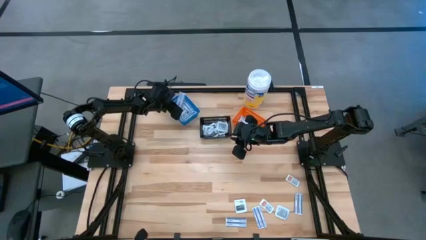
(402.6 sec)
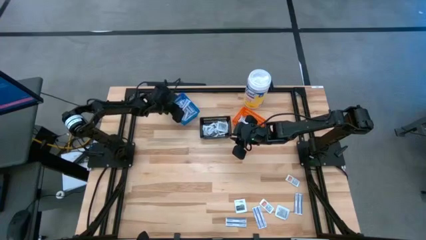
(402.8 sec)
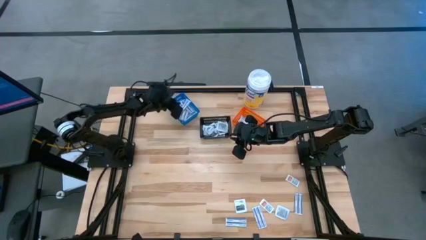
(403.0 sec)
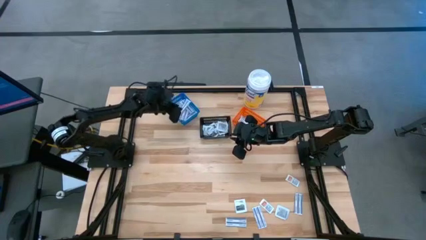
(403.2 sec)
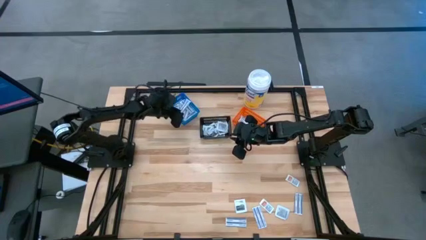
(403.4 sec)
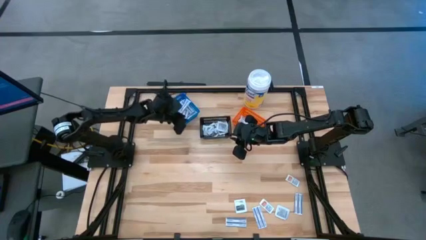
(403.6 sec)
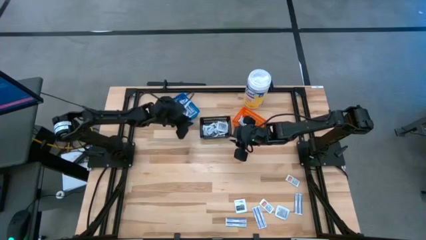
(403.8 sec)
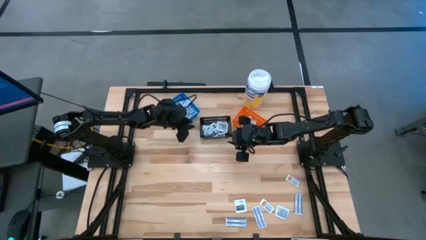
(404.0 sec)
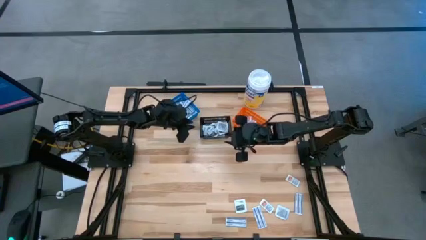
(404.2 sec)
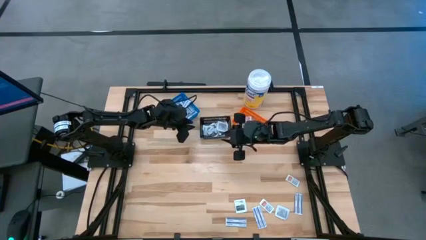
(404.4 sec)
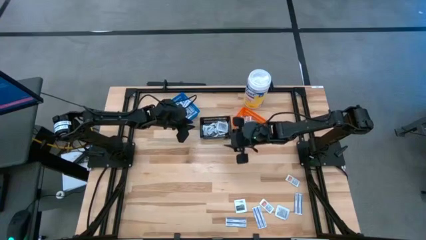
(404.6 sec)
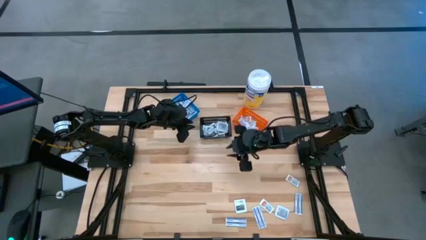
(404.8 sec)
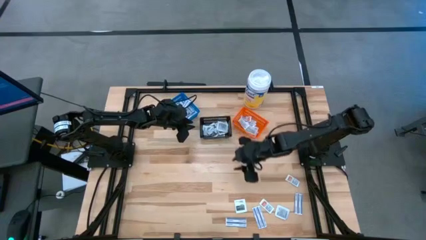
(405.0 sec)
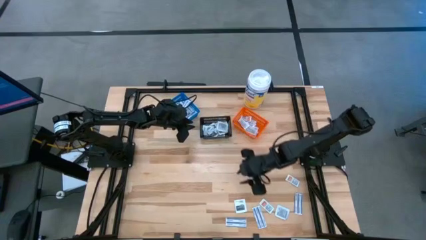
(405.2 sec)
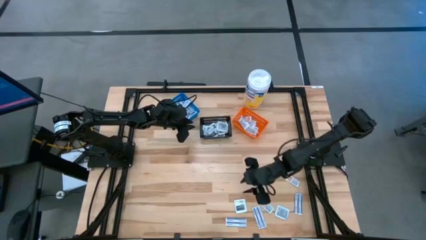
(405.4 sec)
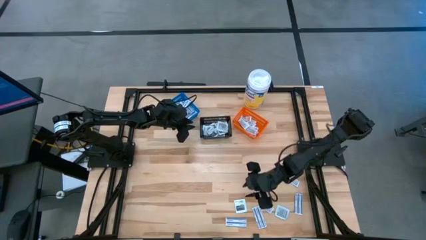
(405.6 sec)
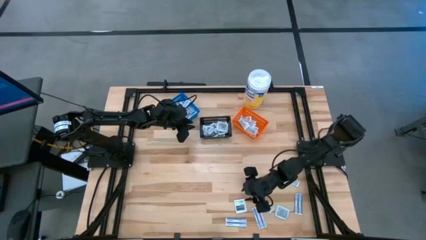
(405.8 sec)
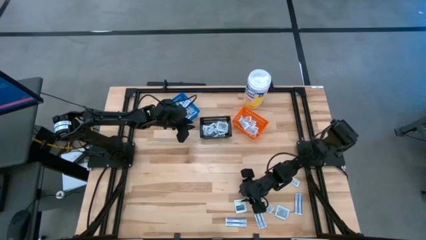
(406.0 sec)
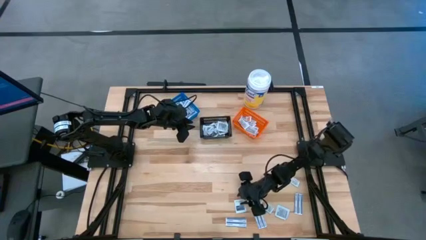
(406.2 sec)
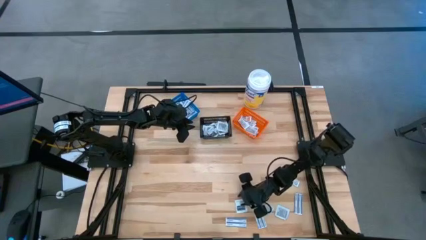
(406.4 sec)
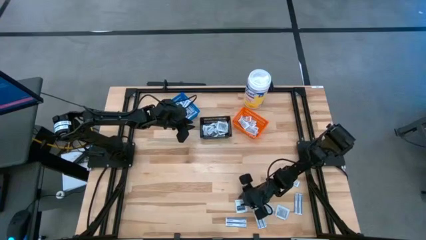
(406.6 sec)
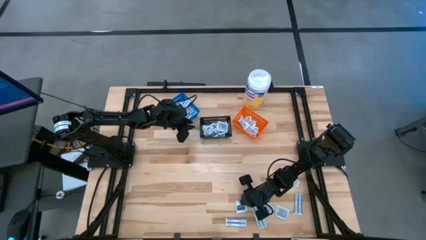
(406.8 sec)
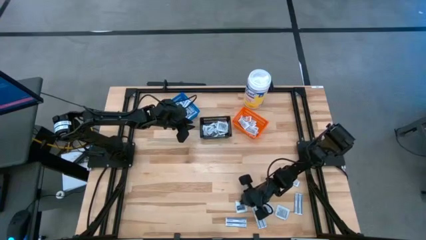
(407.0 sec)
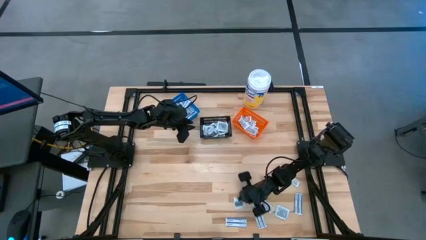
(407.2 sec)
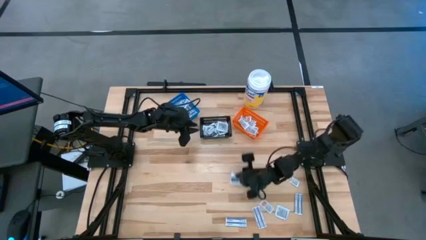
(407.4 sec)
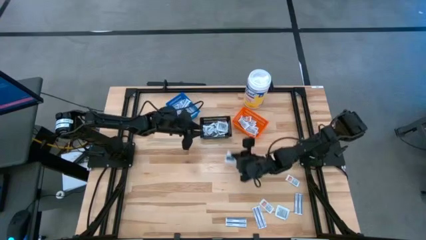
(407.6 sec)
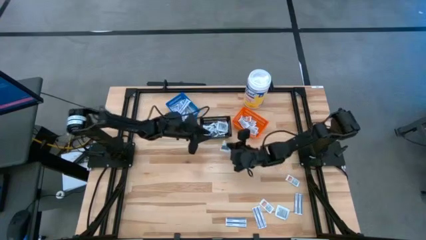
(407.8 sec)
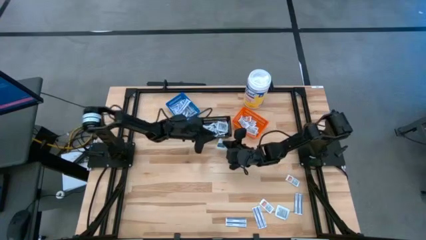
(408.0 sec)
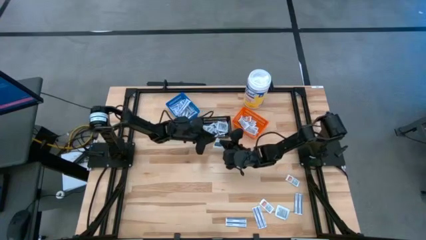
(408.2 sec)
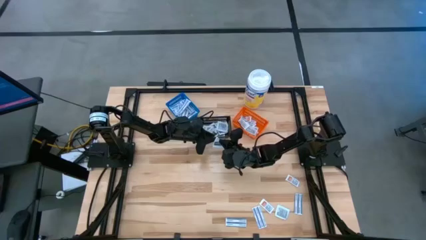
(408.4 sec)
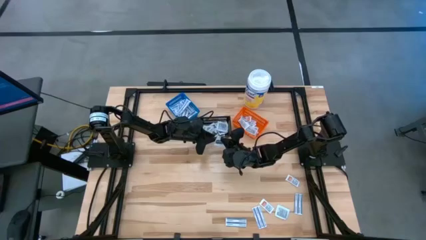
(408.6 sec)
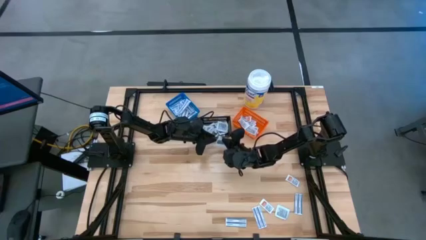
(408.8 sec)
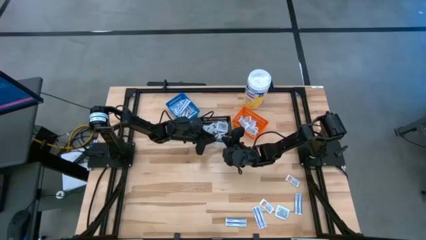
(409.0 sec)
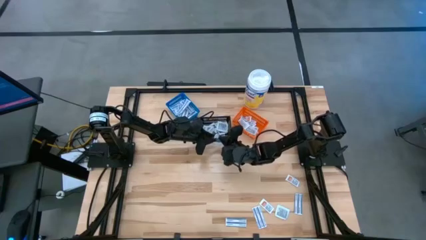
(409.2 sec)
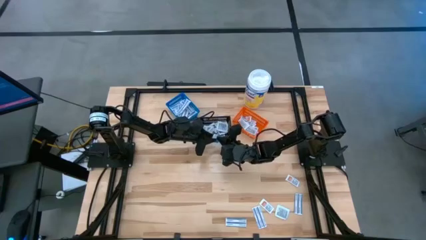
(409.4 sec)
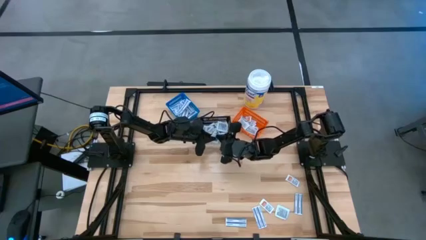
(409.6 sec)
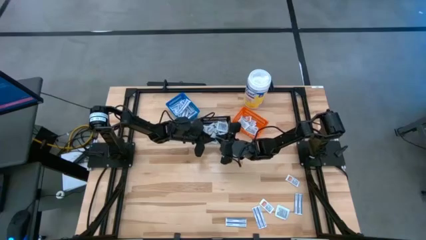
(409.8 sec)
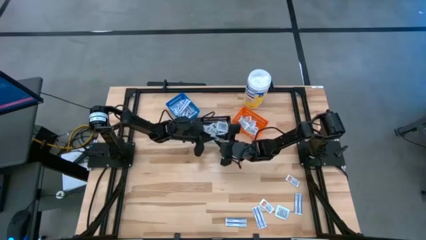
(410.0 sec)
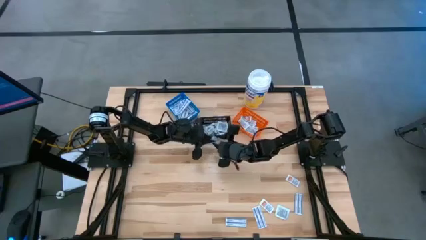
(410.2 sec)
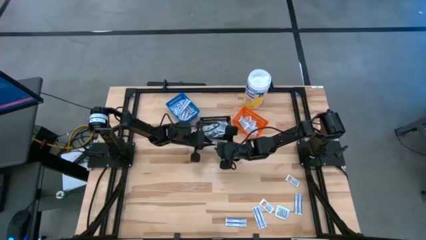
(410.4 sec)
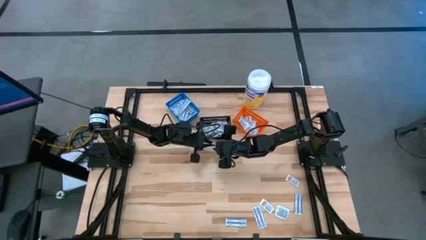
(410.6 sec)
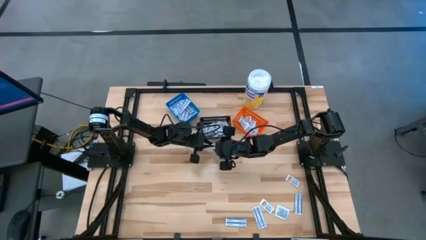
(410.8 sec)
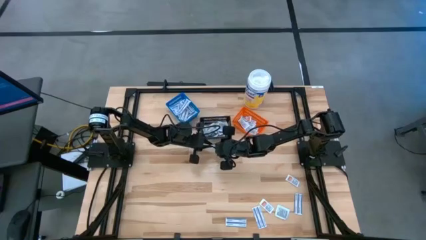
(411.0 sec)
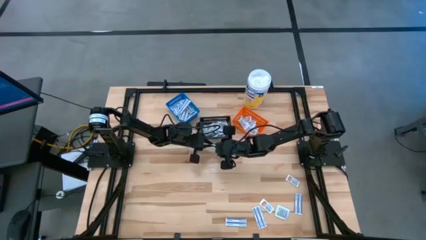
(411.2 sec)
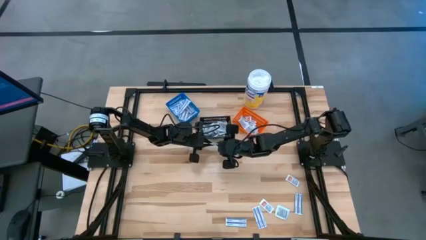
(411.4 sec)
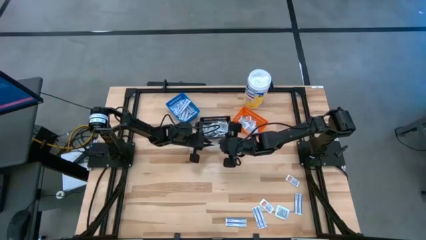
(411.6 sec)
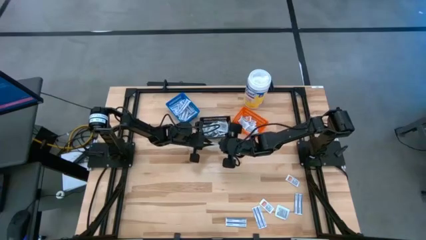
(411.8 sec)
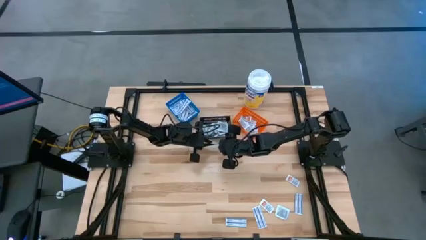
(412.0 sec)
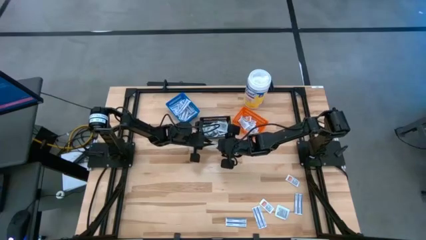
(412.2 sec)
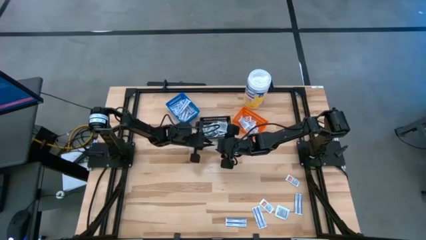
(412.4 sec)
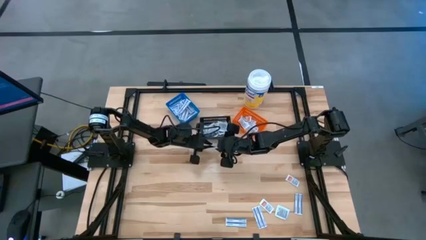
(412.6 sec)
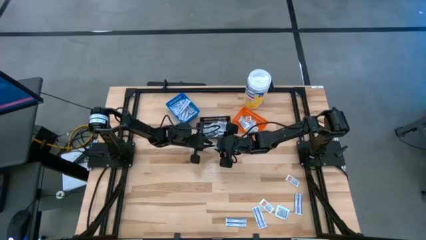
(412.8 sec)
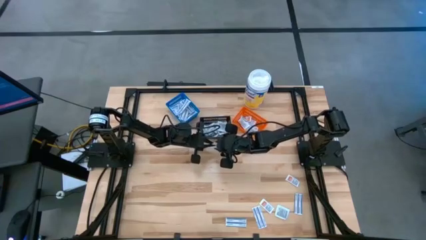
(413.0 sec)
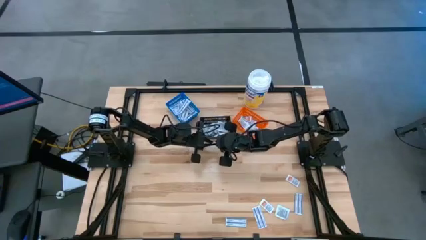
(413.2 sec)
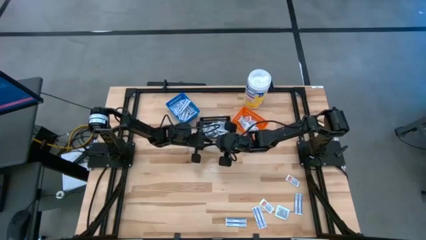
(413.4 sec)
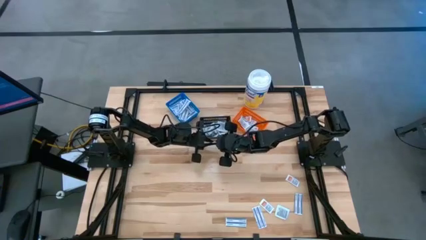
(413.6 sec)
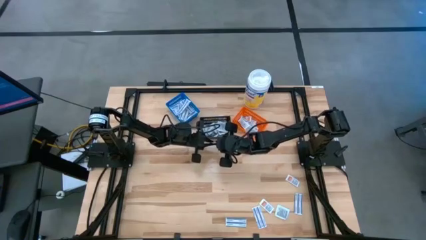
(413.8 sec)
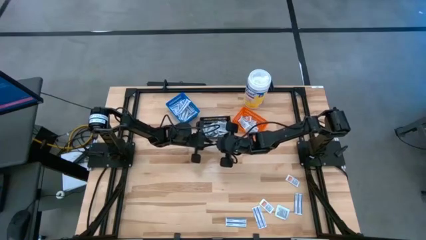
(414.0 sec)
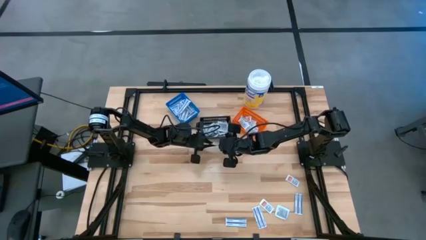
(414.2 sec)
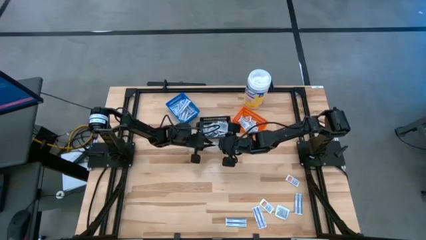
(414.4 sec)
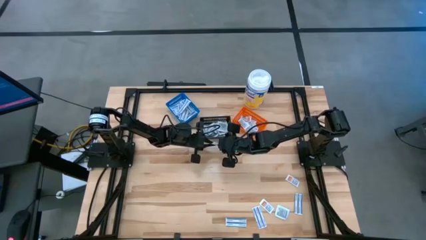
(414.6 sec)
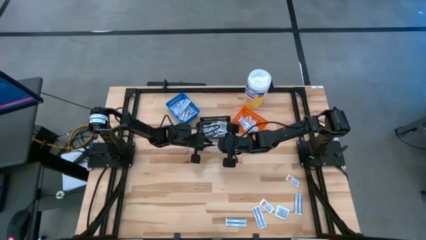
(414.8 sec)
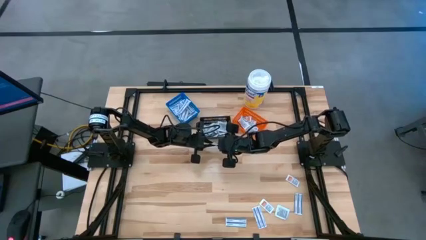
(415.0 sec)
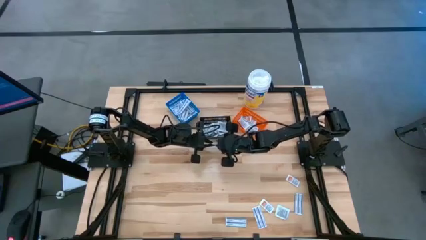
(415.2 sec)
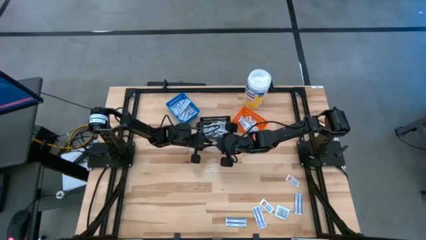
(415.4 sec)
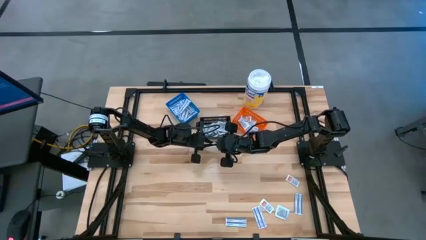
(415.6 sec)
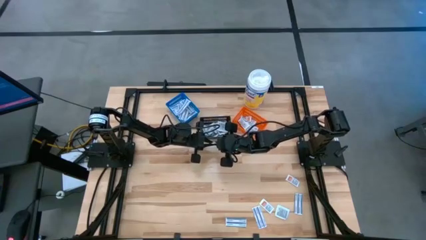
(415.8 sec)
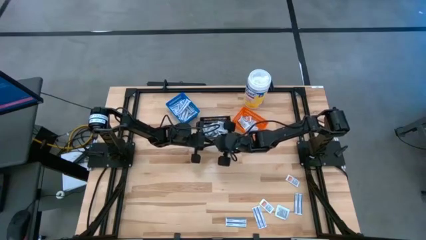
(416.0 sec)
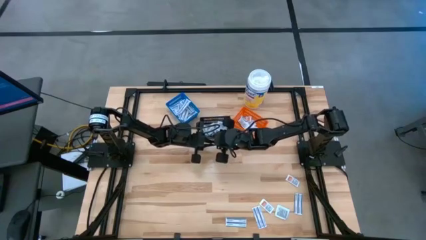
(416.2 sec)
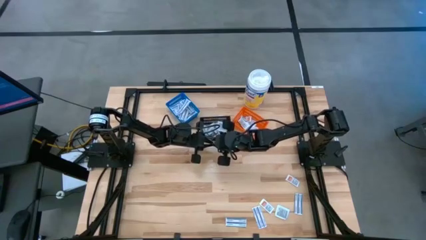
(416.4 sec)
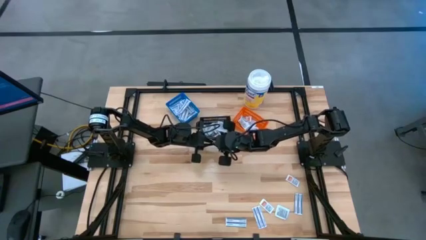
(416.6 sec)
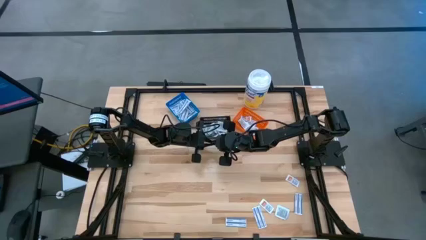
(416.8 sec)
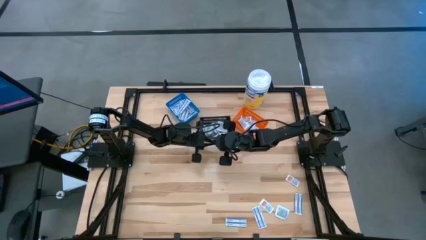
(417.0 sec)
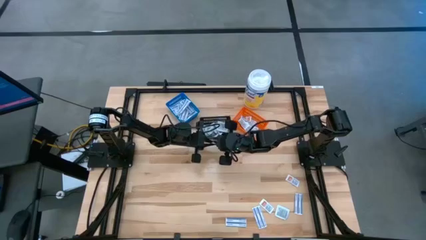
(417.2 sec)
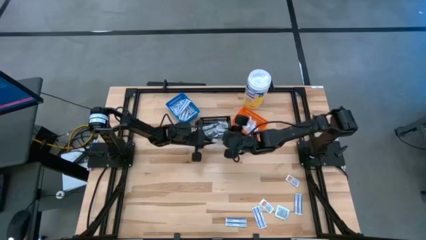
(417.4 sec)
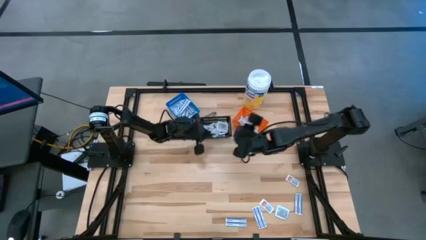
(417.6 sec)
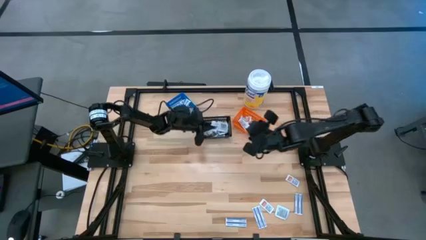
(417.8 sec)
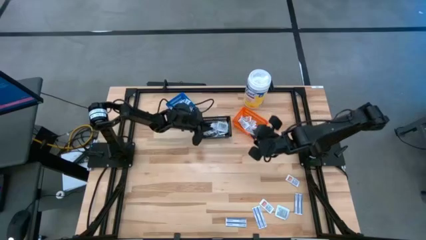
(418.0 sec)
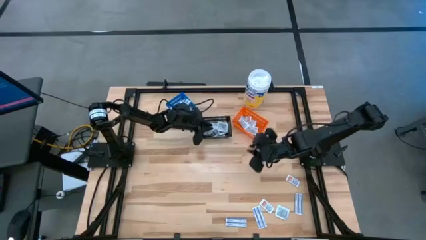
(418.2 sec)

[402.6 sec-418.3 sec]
Task: Pick & Place First Aid Supplies
Put the towelette pack into the black bin

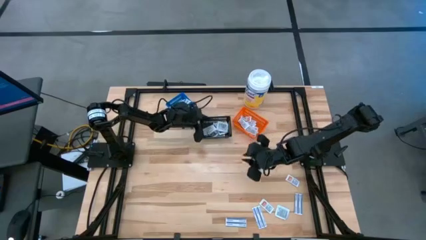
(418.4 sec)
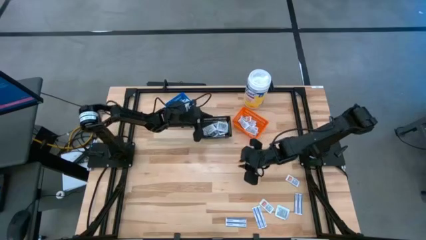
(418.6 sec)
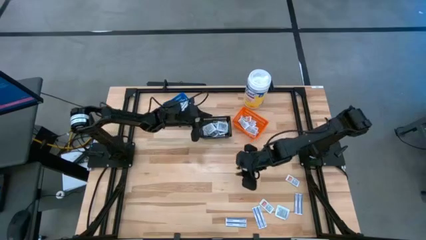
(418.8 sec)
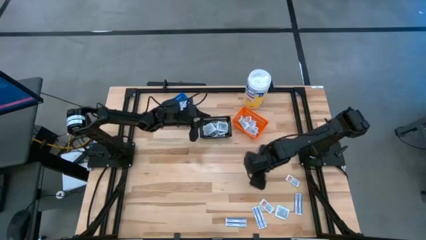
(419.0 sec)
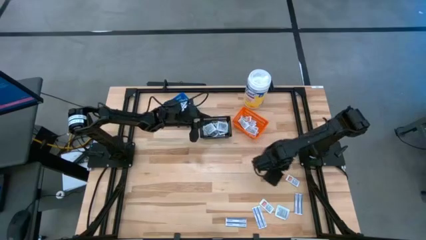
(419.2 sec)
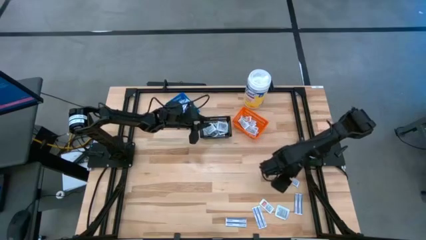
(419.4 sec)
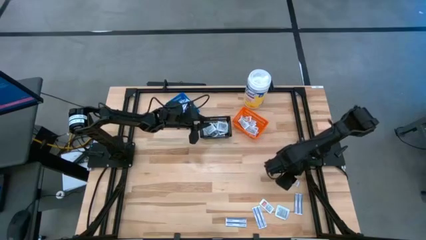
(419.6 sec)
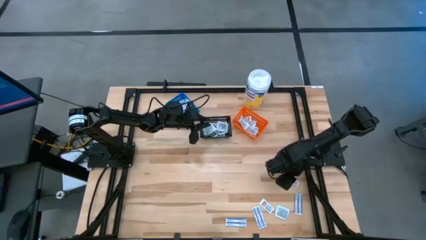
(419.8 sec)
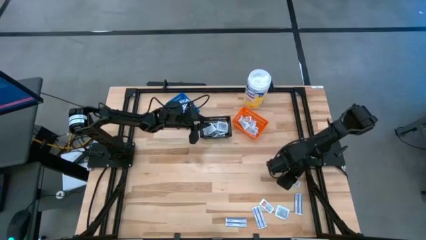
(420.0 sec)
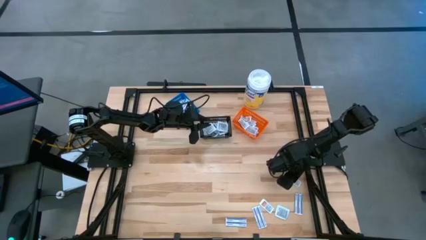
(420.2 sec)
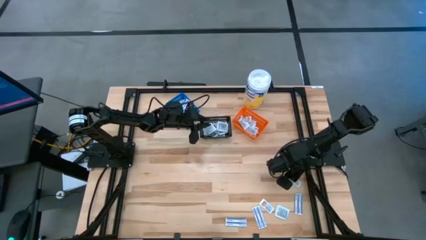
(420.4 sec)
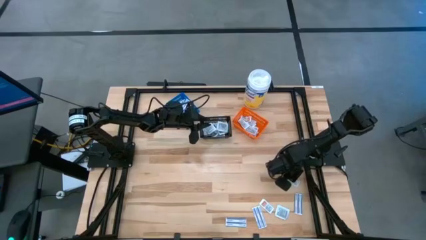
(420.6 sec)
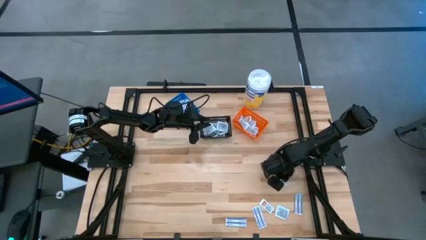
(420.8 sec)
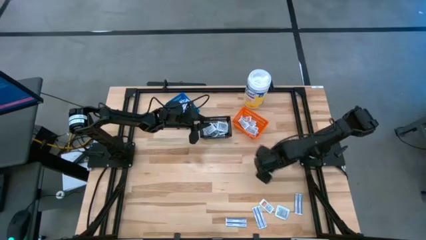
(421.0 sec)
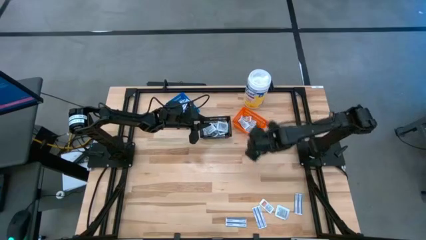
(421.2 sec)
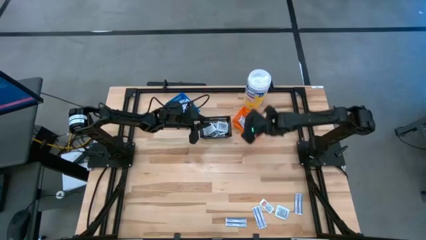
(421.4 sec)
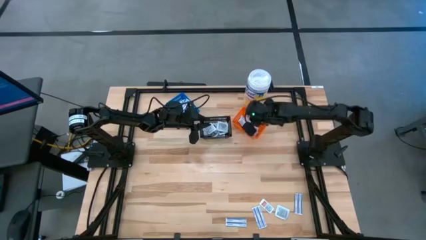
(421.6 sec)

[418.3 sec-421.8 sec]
Put the ointment pack into the orange bin
